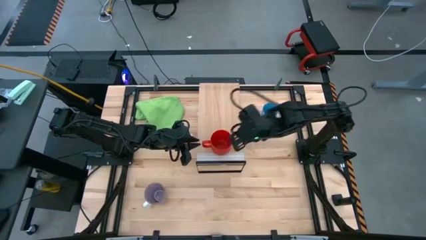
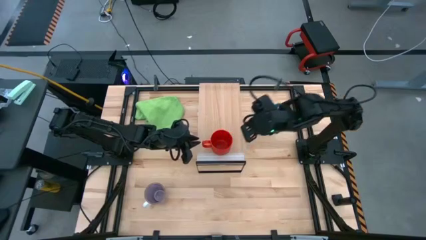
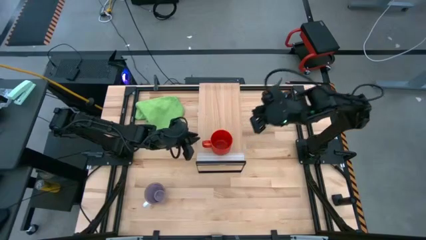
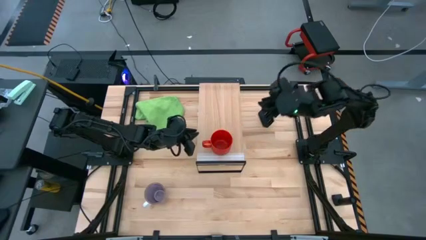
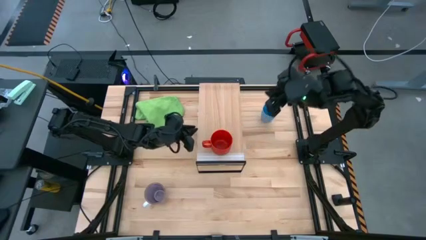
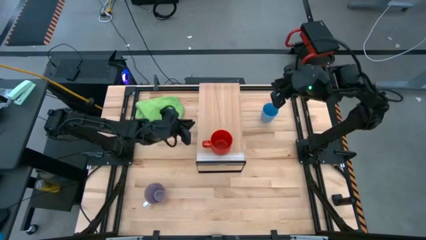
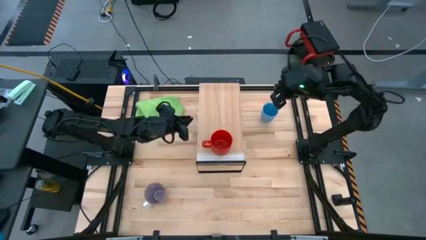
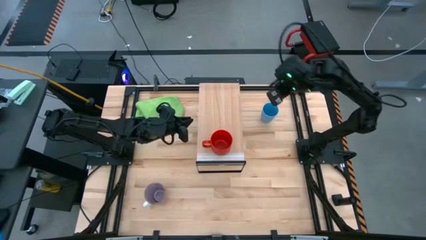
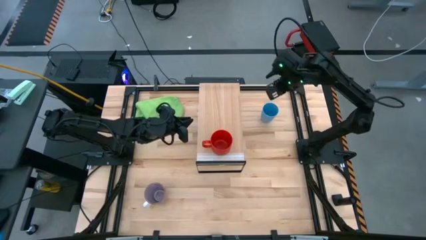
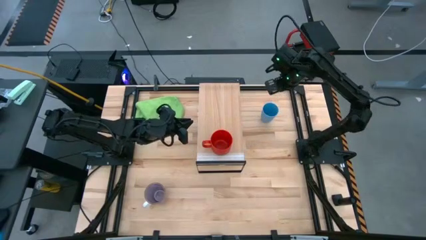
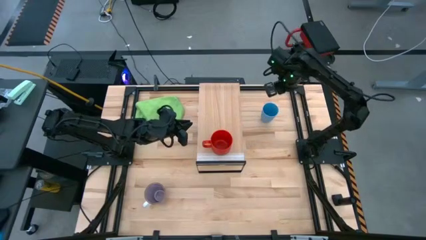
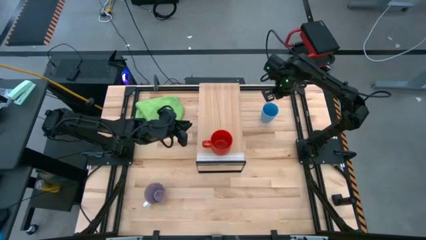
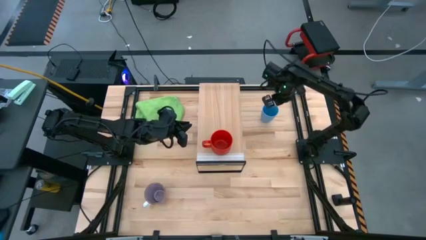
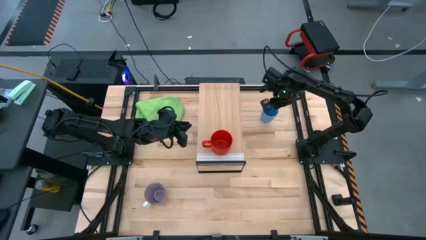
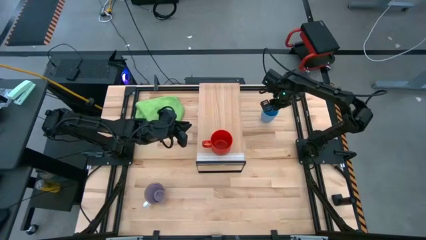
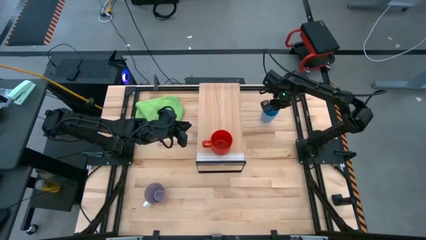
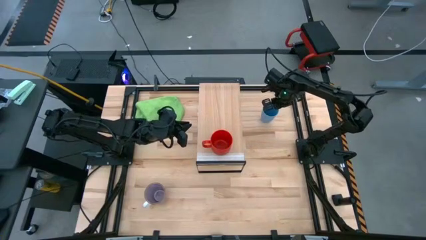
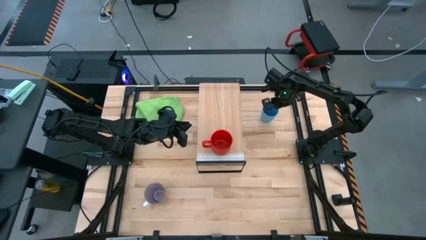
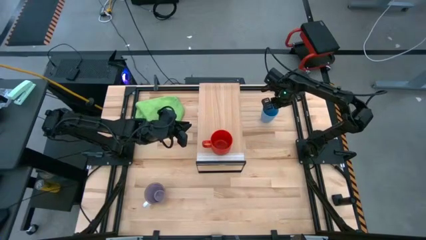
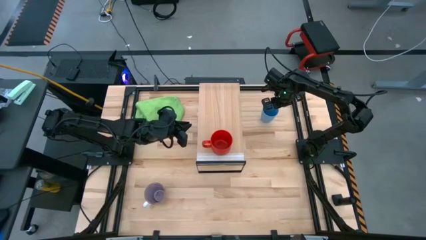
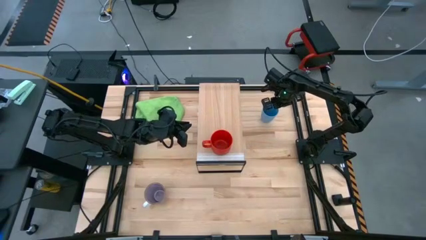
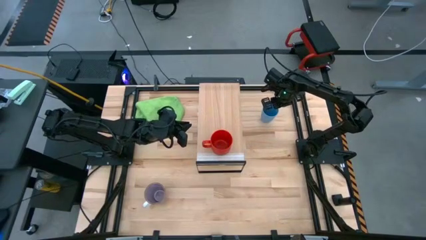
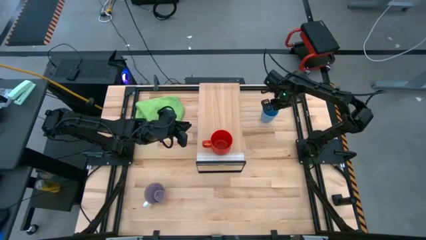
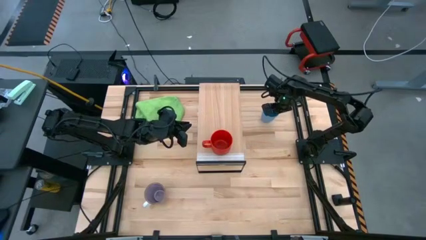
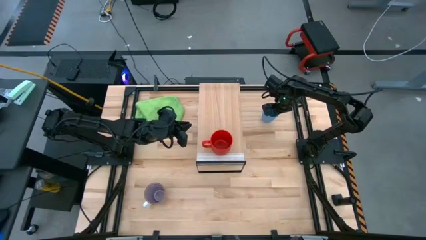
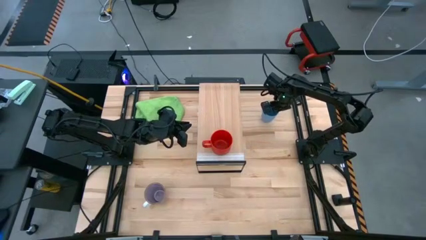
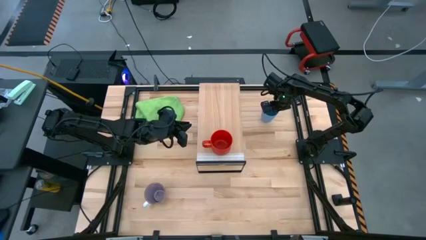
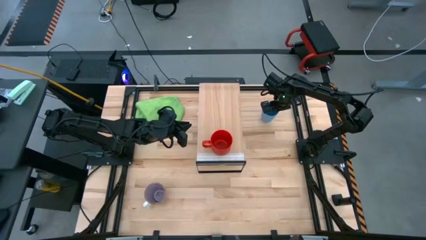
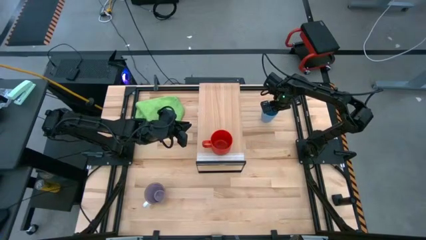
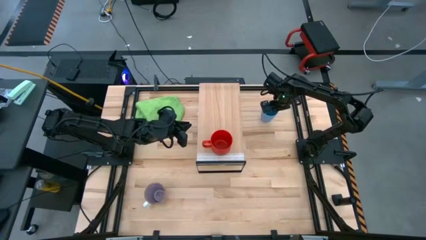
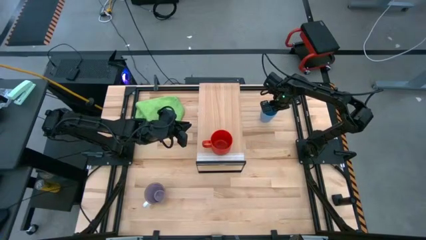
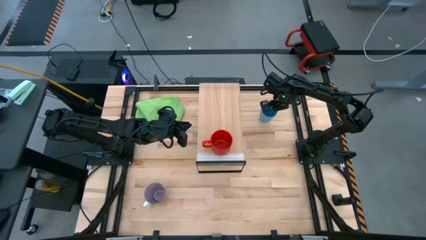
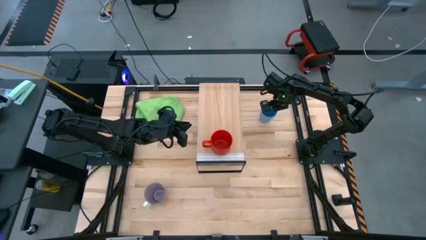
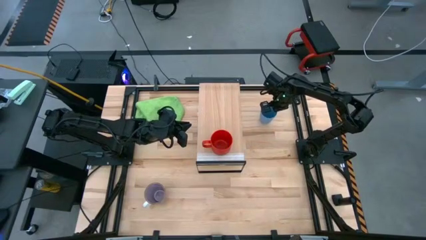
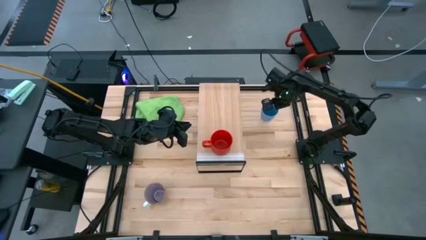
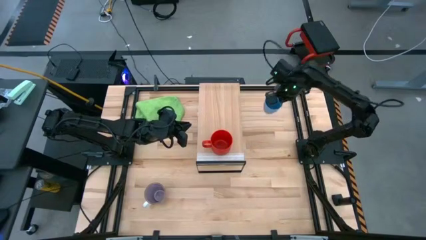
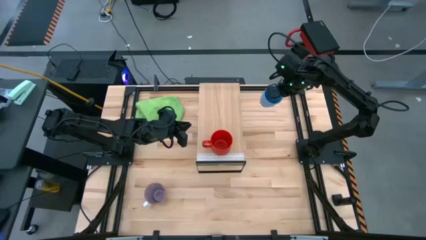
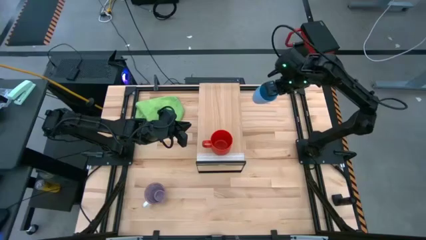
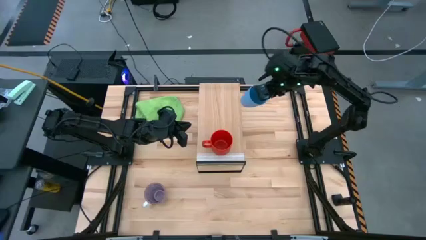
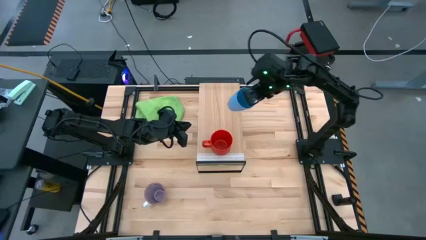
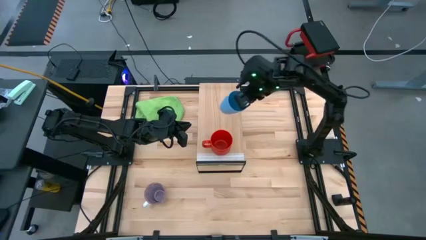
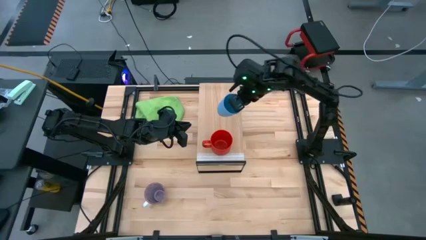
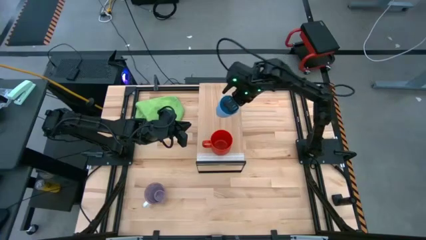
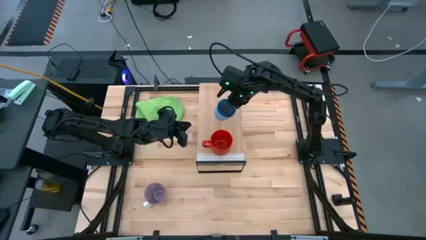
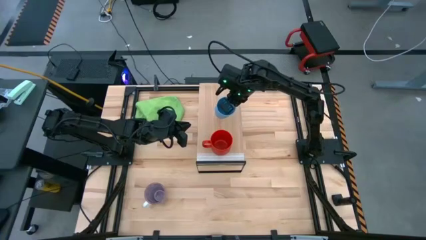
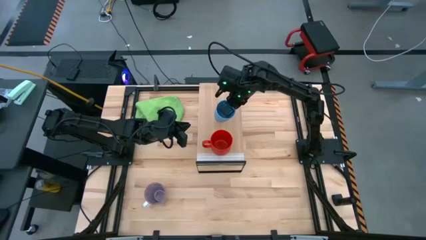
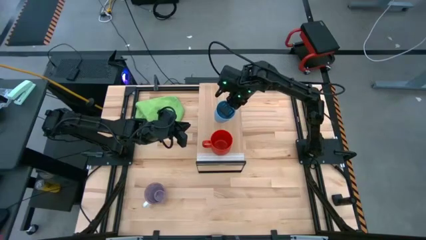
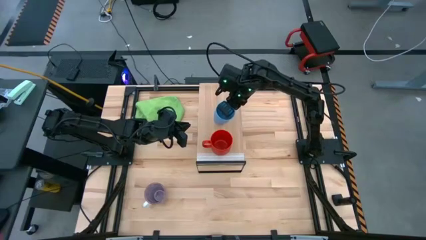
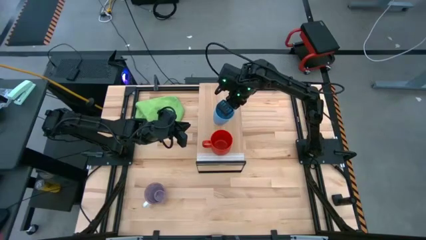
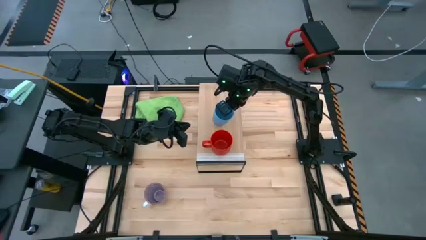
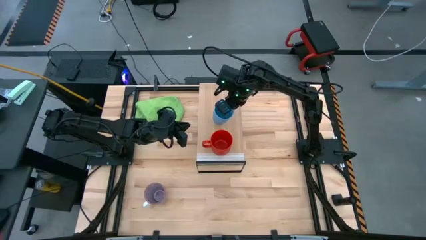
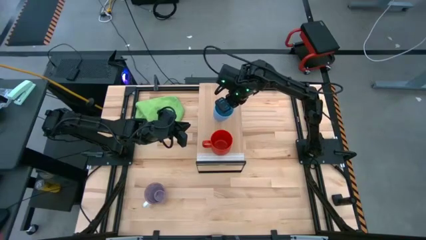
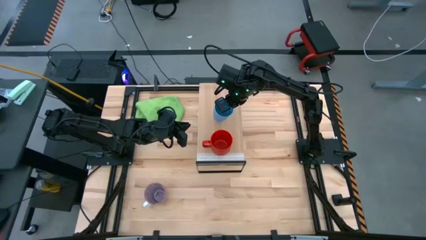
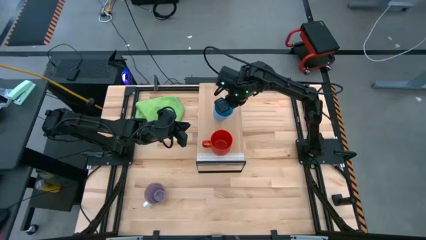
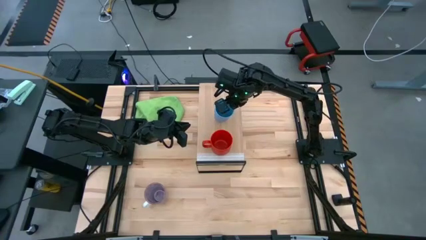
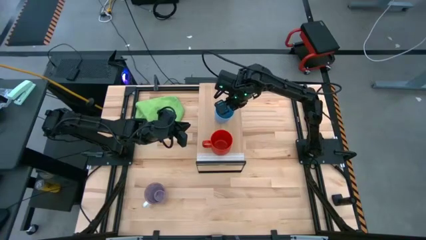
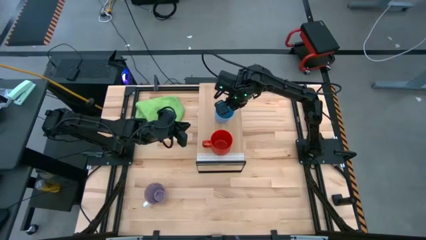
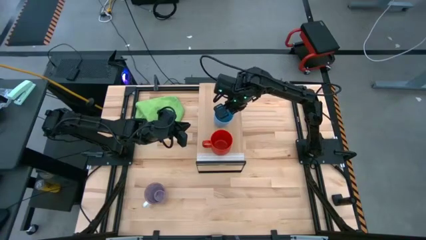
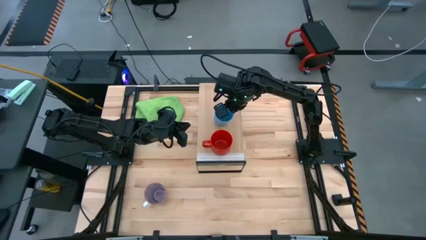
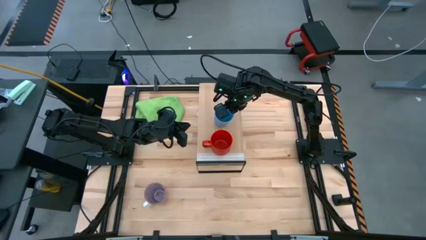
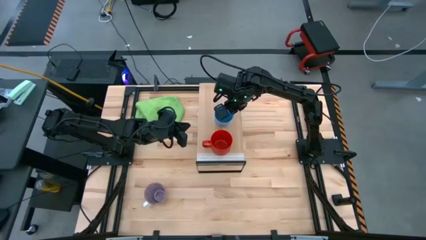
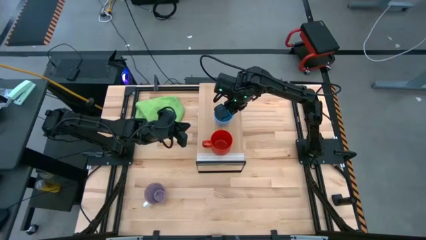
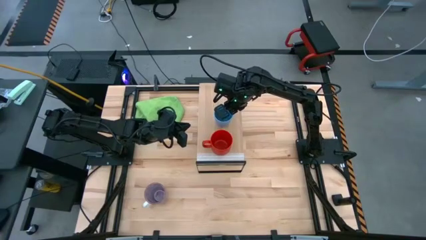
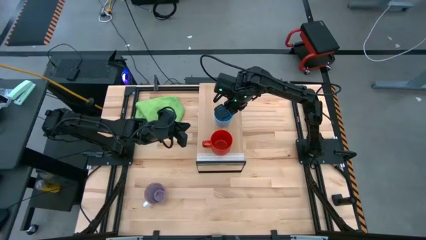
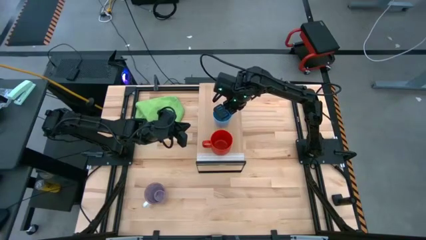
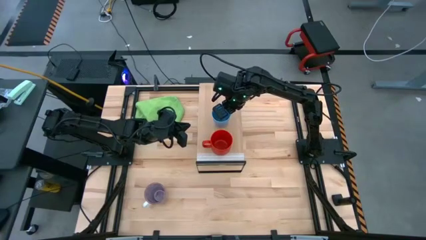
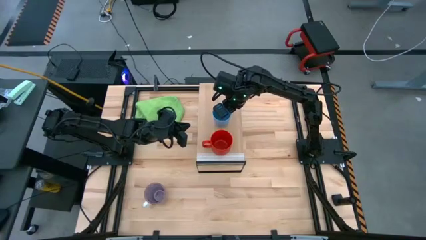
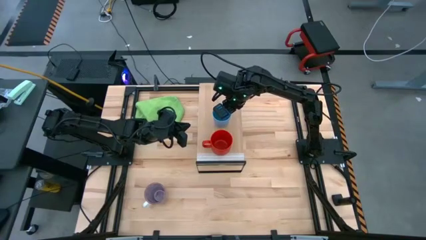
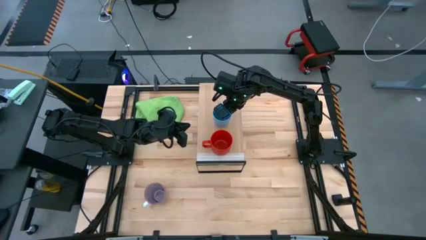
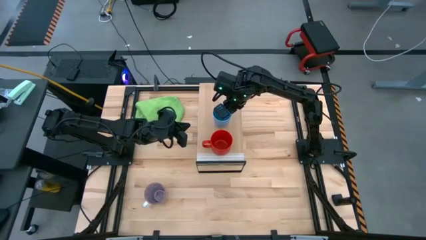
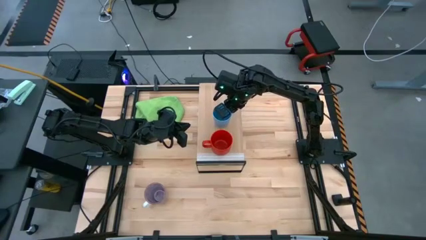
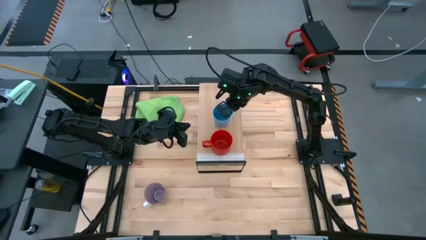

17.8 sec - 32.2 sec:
Task: Stack small to large cups/mugs on shelf
Put the blue cup on the shelf

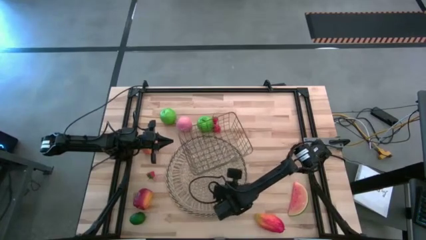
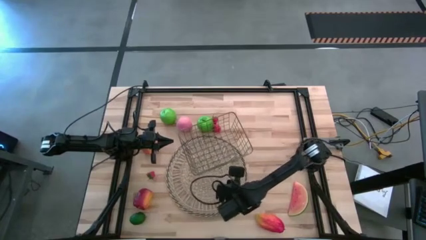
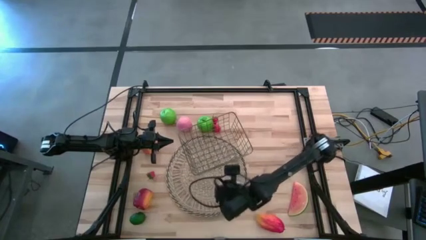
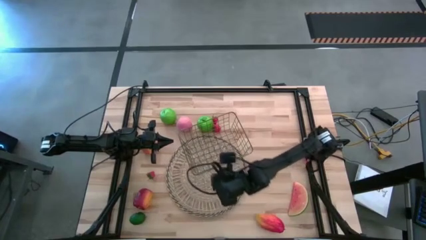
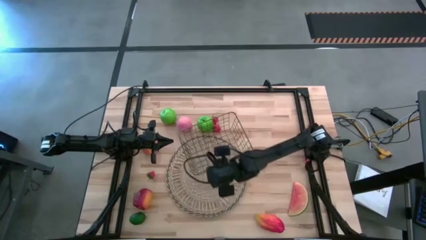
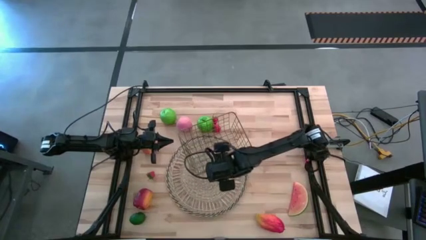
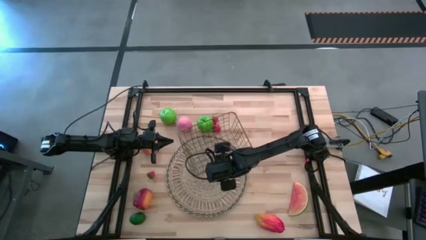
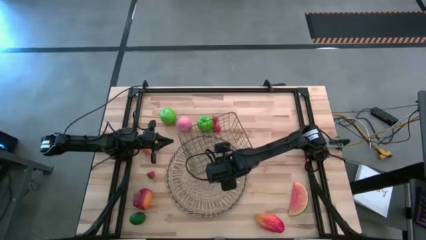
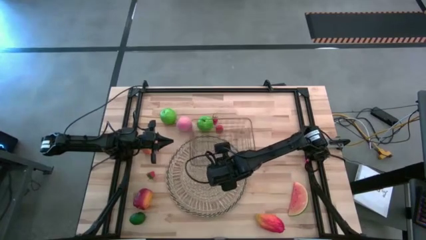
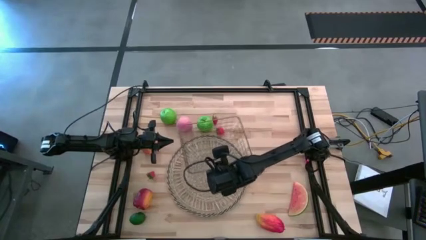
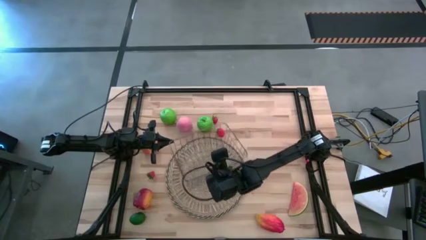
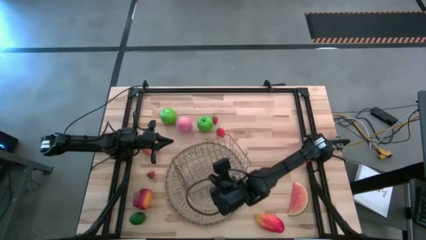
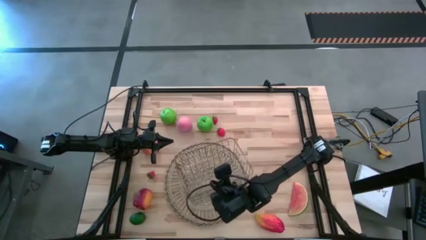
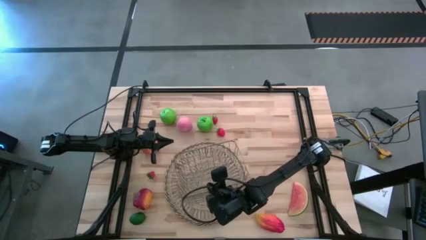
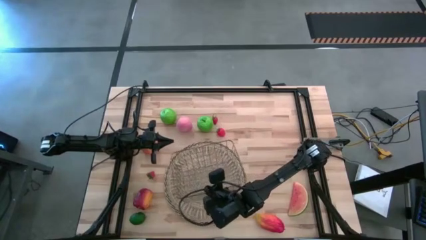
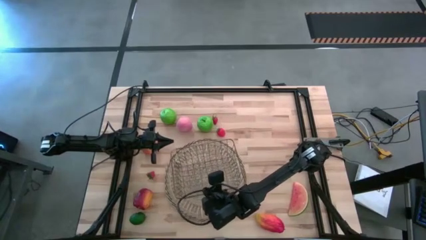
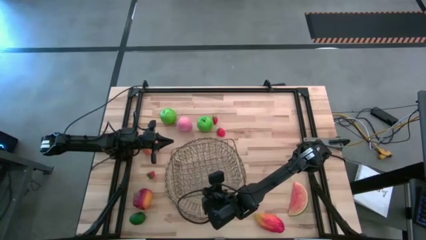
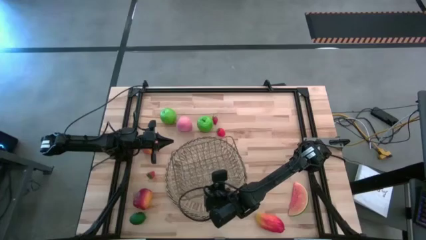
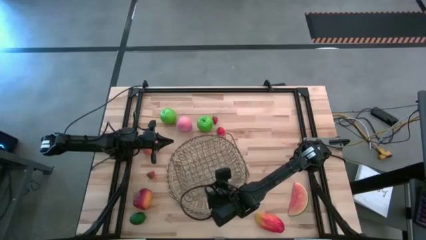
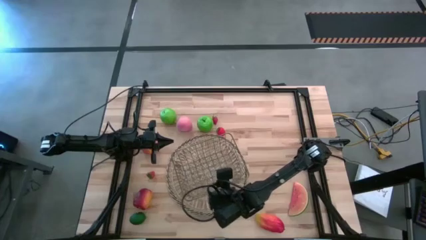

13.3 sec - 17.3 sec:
Task: Build produce basket
Adjust the gold wire basket

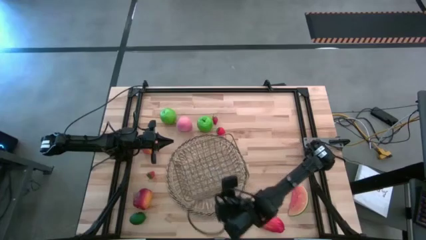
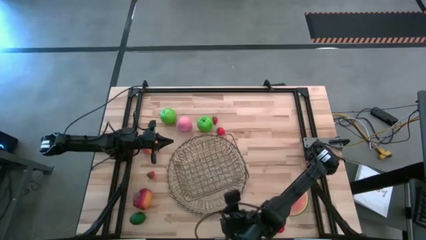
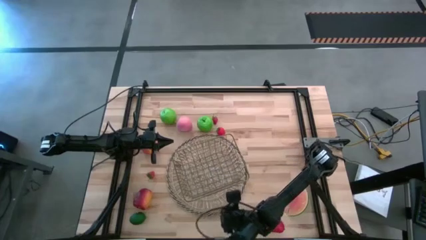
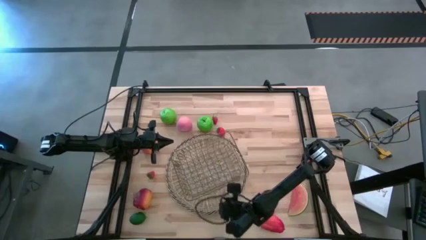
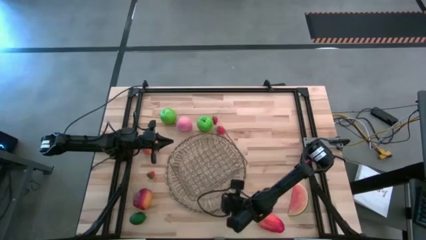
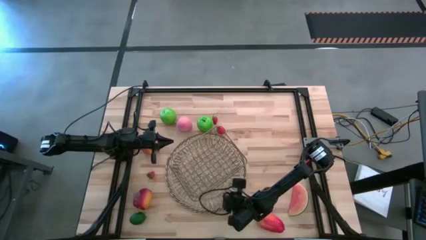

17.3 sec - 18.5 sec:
Adjust the brown mat
